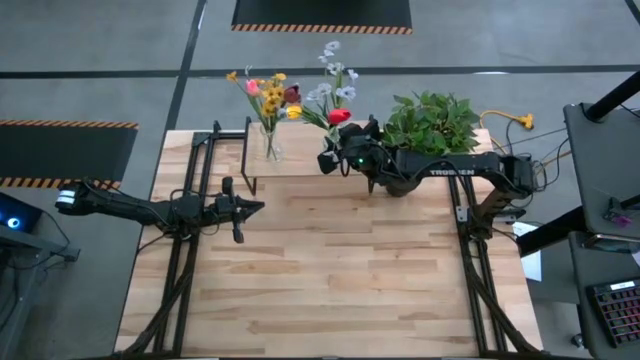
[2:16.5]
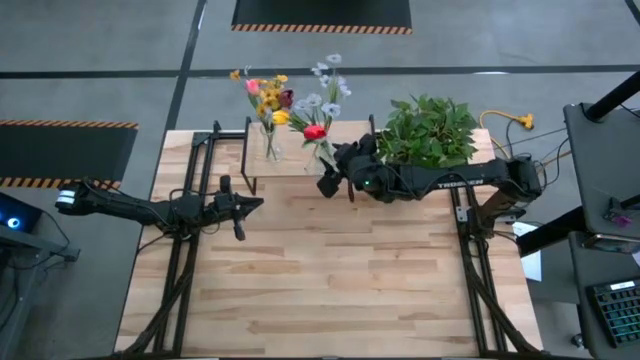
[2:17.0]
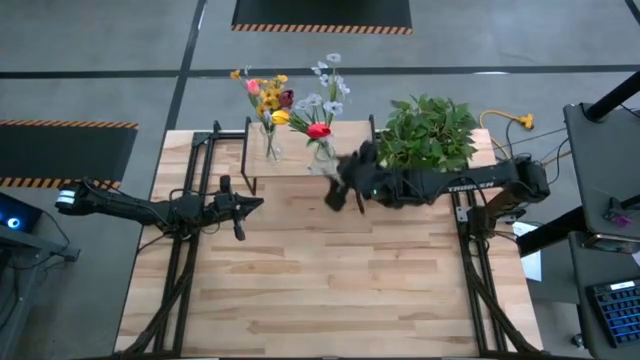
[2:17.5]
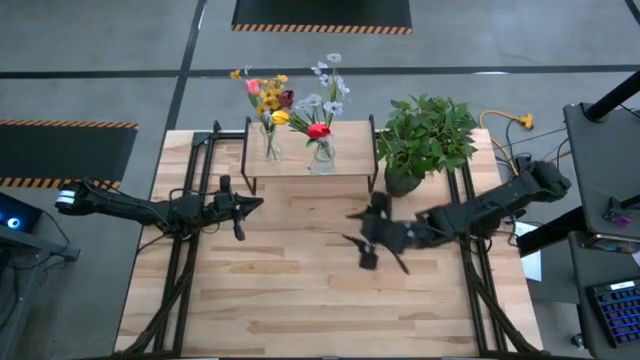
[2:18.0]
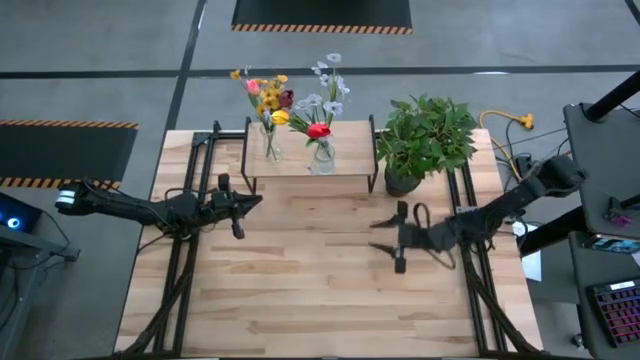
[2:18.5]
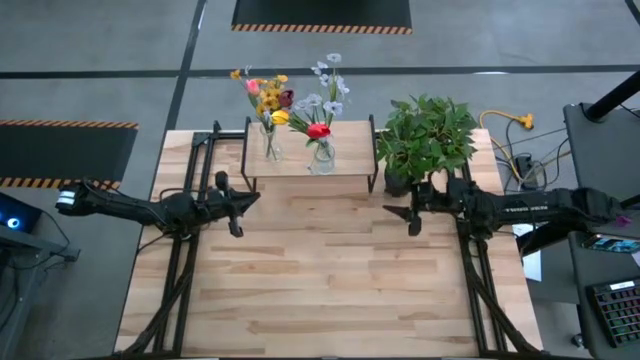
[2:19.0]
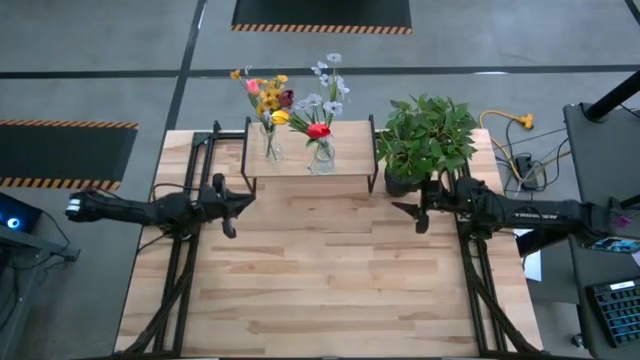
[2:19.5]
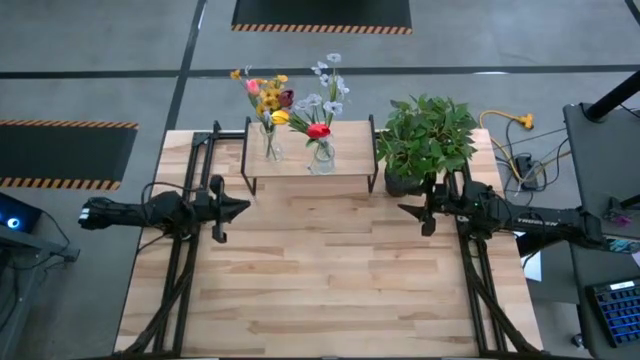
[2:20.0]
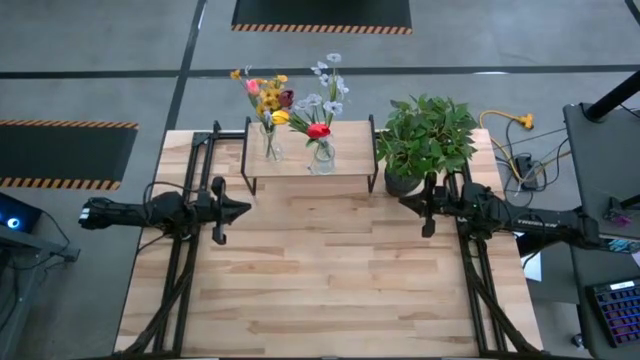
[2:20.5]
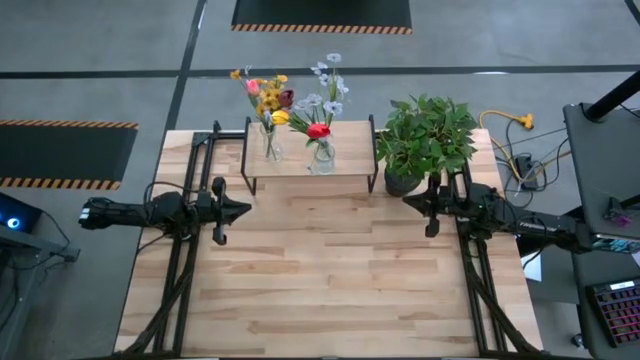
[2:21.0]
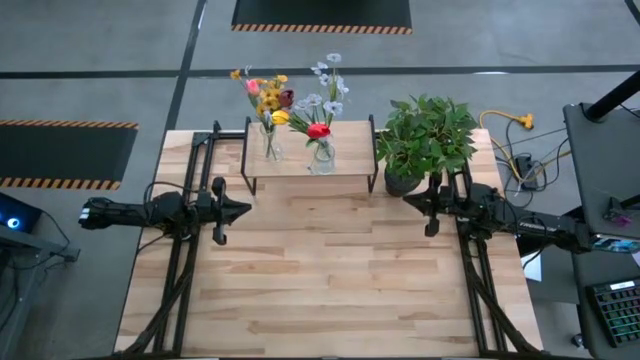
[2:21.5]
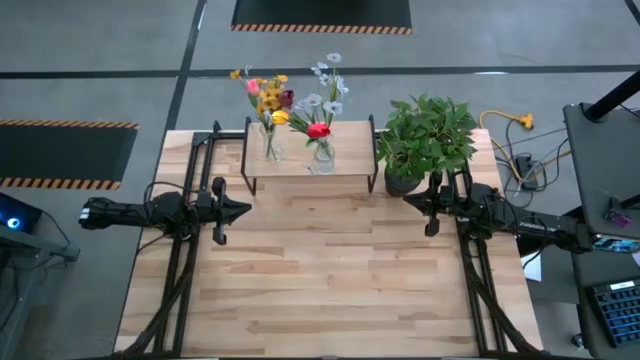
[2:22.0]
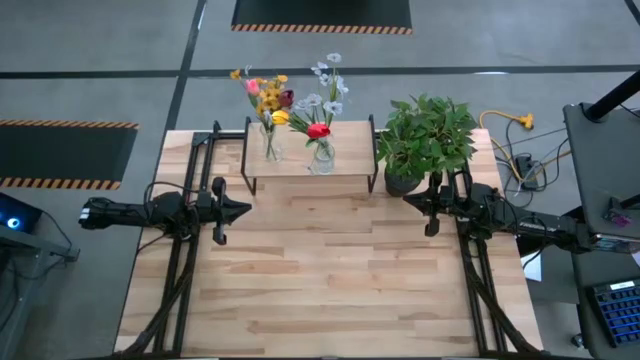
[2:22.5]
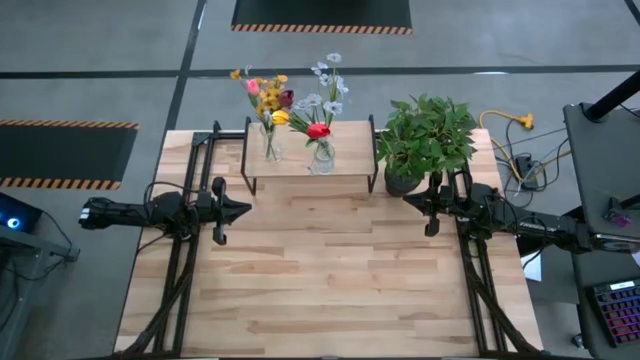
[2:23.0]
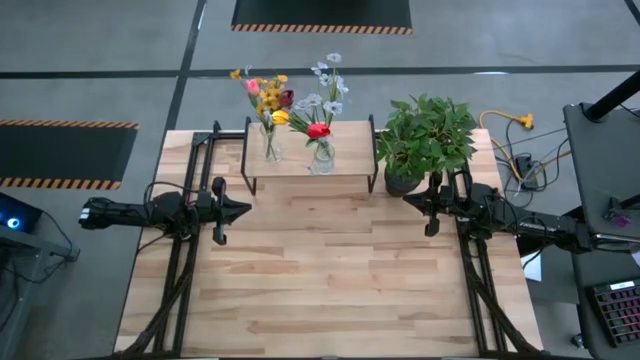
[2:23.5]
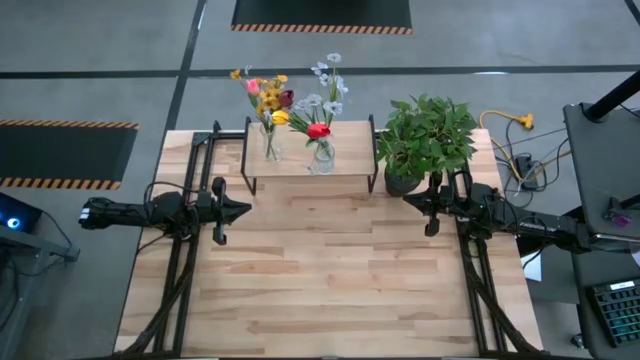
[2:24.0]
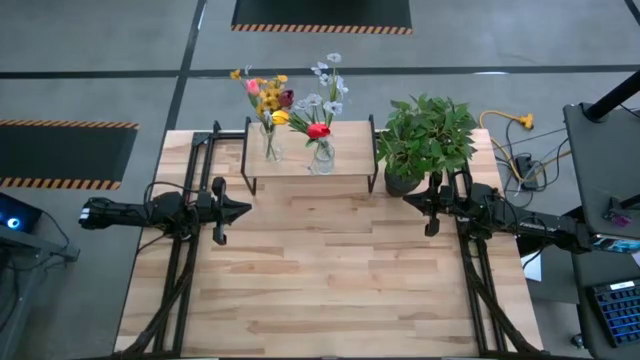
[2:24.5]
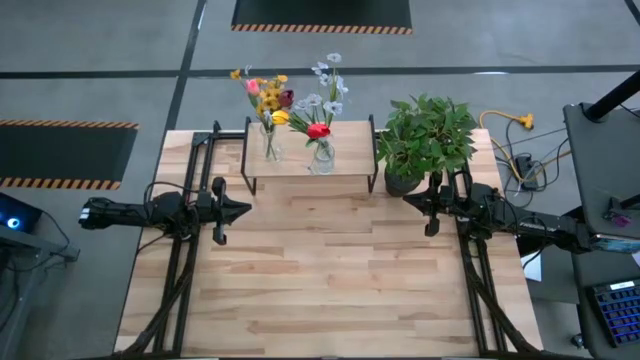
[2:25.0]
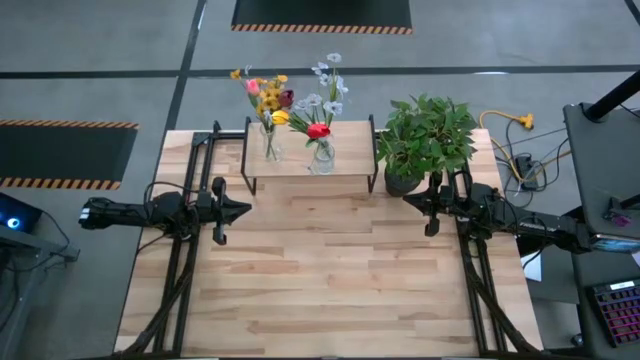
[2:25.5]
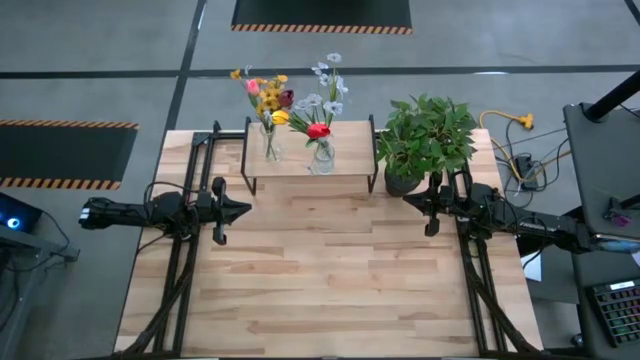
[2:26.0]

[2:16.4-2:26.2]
Task: Pick and place flowers into a vace then onto a shelf
Return to Home Position

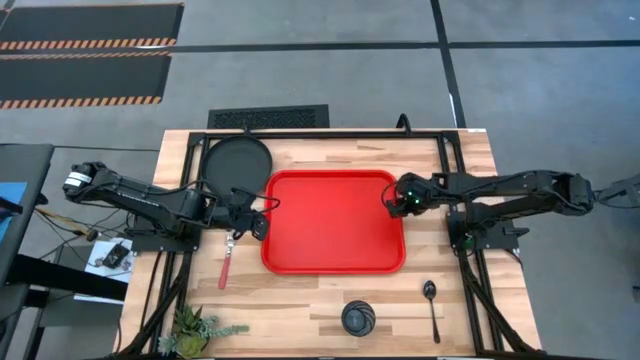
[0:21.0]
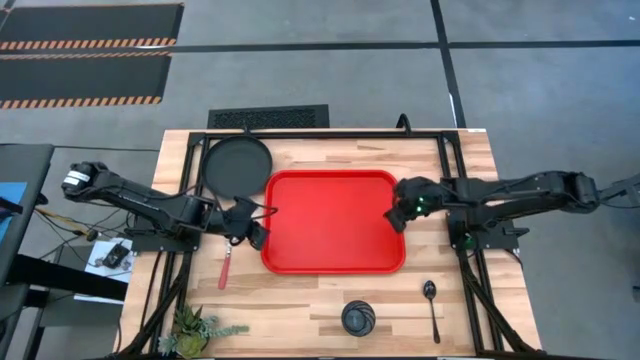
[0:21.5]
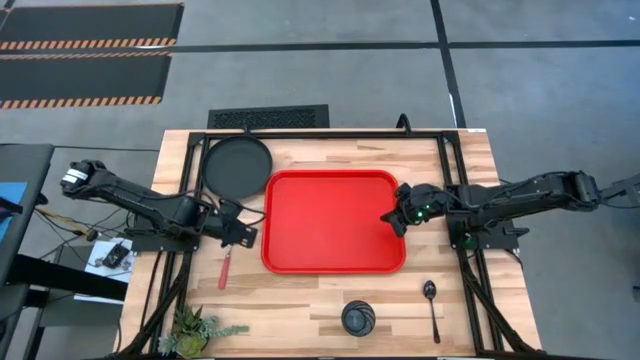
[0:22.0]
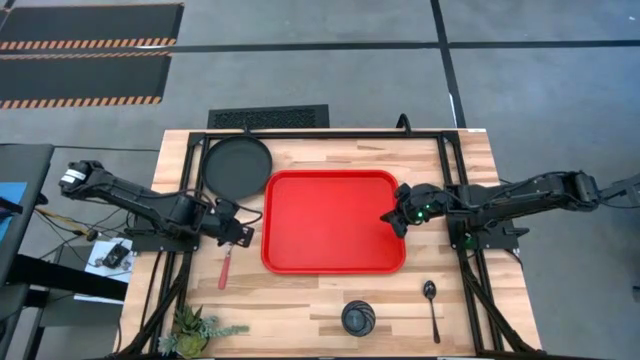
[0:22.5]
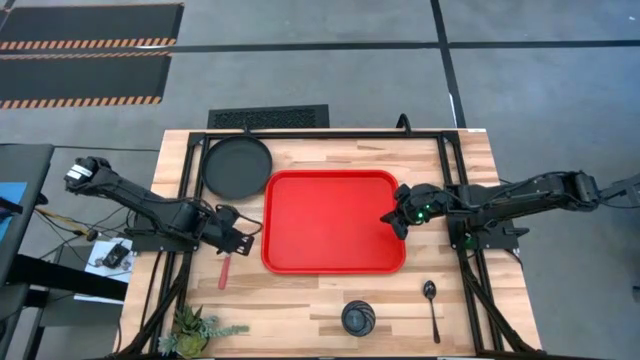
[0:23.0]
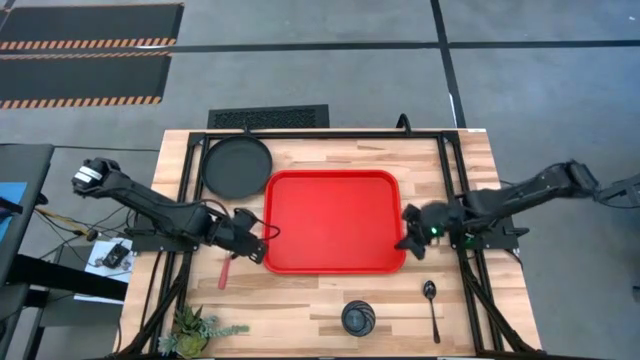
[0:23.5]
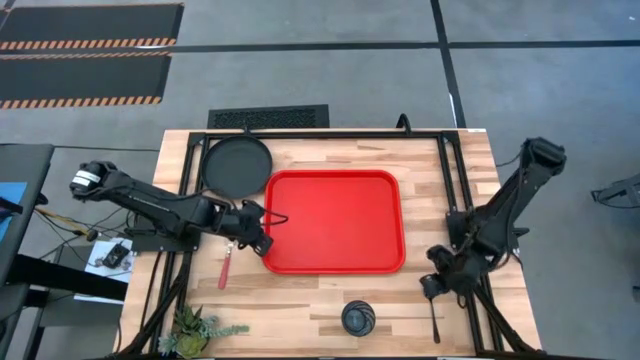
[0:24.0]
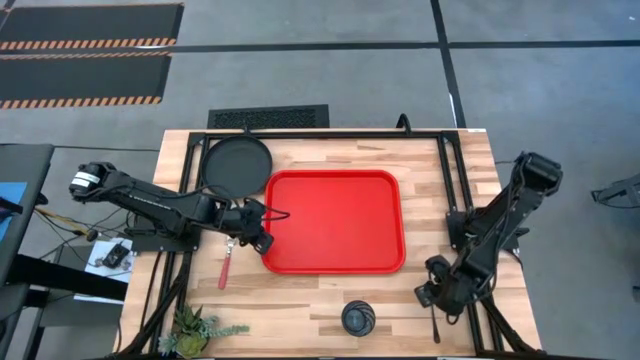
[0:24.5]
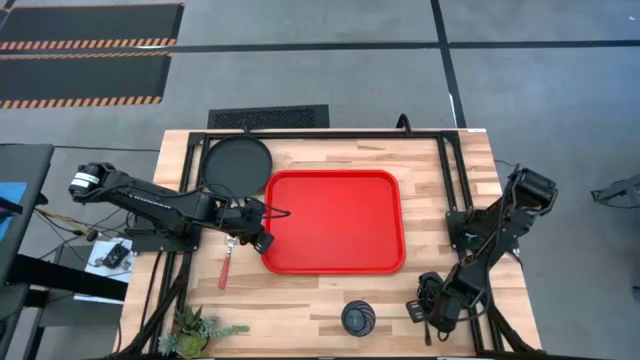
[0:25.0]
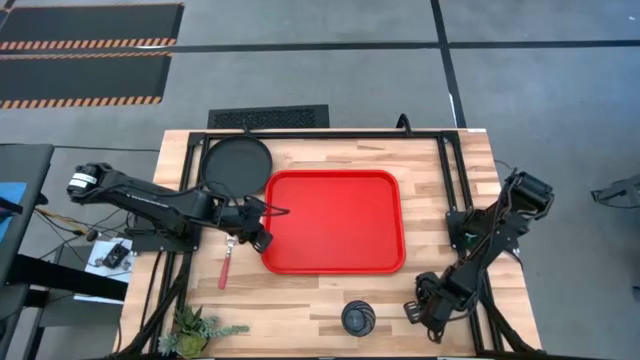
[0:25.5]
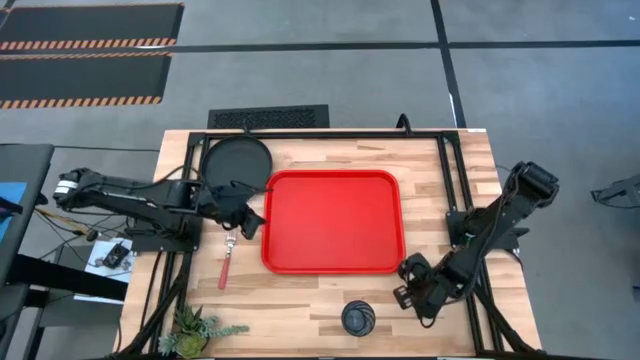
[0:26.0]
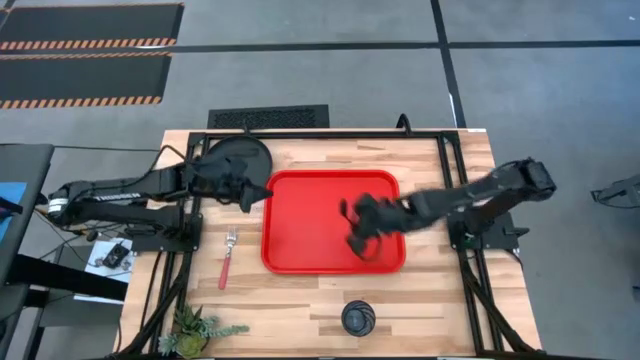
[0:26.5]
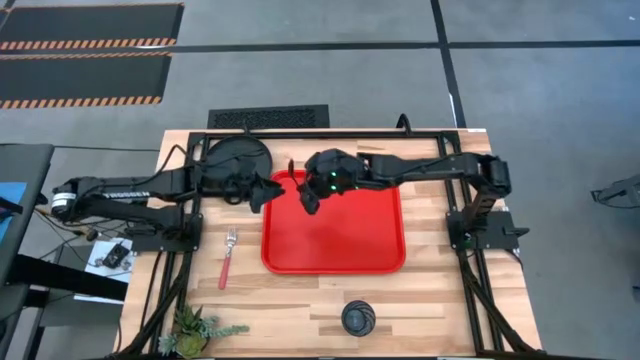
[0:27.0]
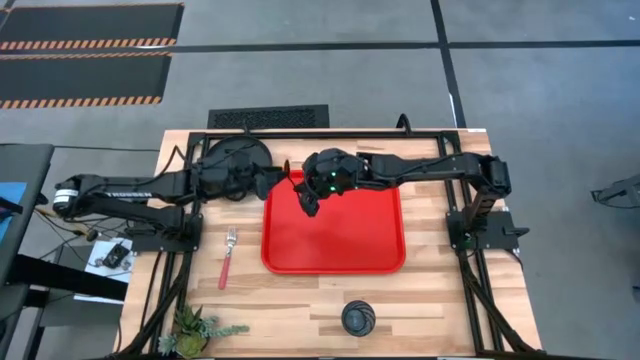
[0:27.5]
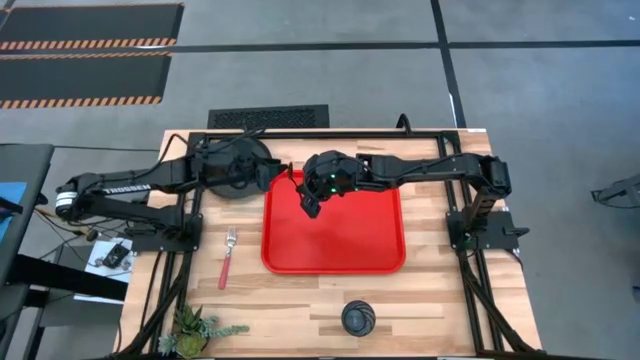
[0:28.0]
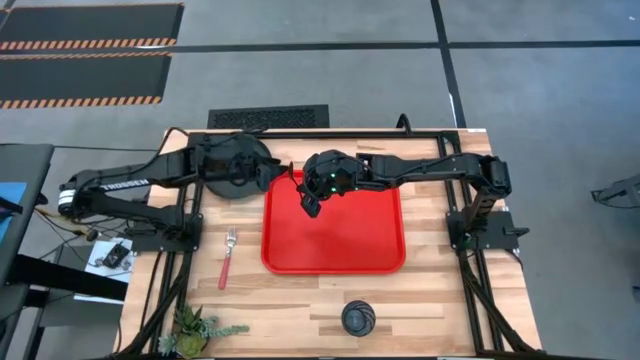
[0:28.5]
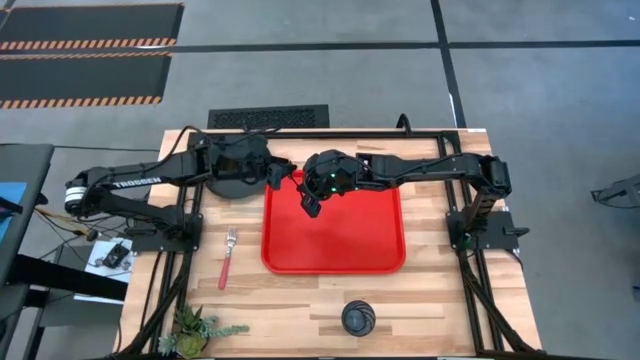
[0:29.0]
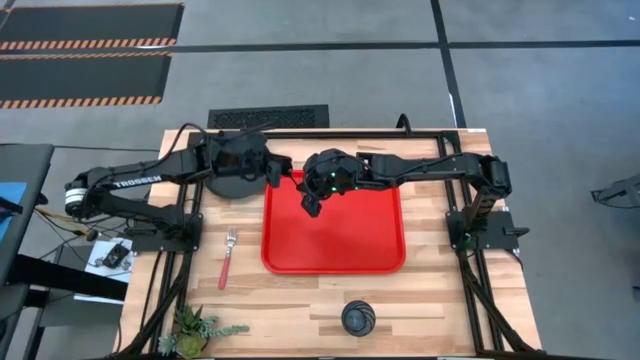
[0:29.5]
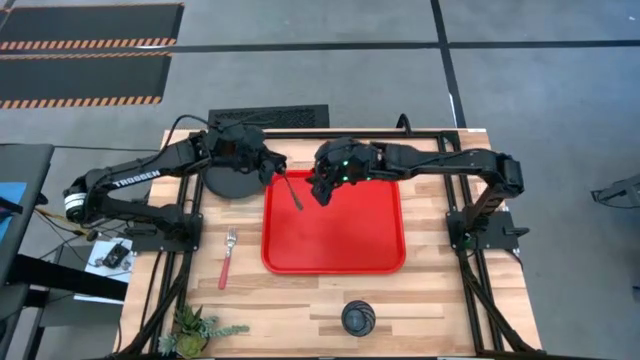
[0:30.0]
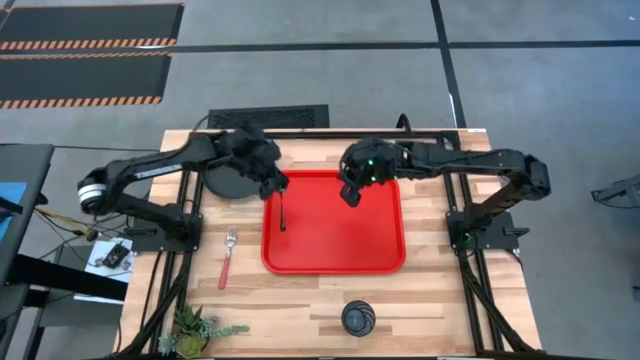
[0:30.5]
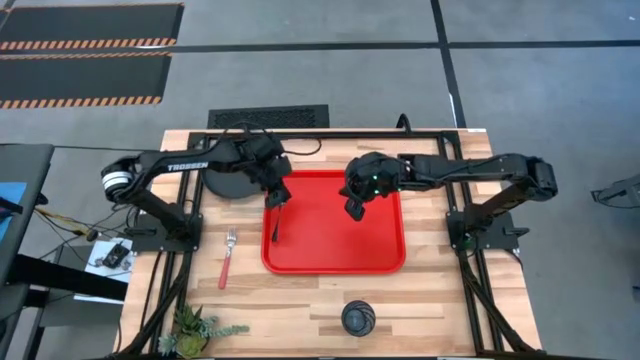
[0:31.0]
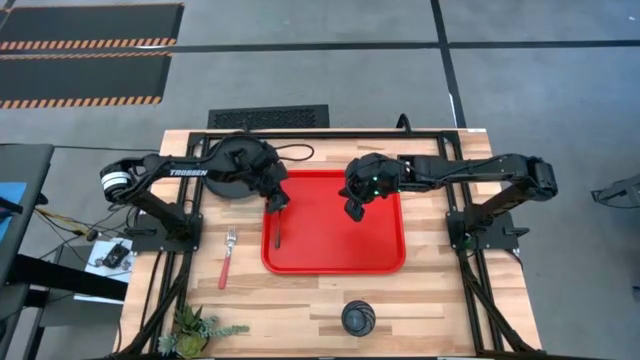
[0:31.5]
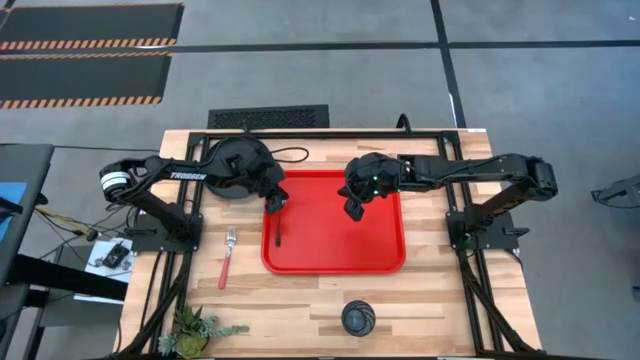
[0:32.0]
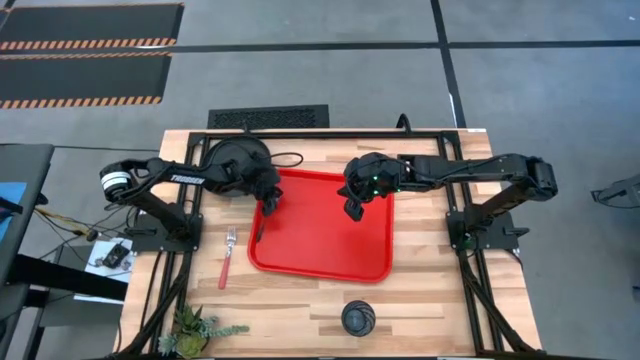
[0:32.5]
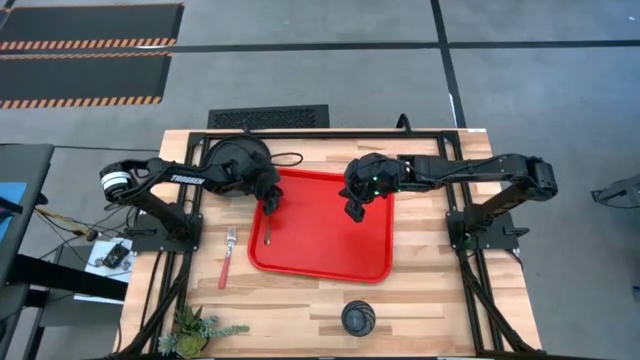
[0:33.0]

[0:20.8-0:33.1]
Task: Pick and place plate/cup/fork/spoon on tray
Put the black spoon on the orange tray
